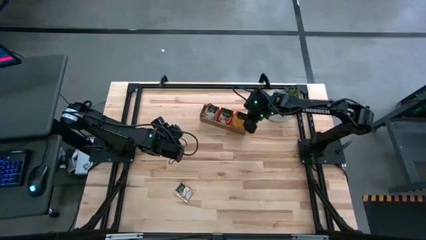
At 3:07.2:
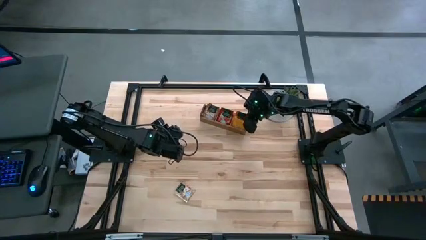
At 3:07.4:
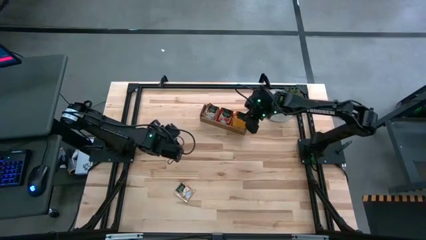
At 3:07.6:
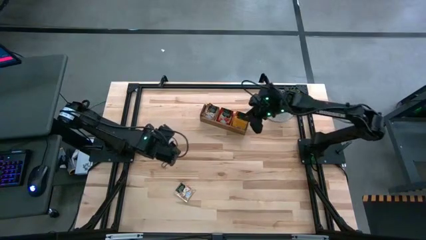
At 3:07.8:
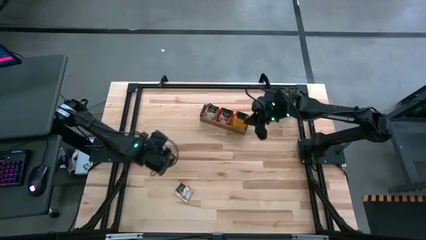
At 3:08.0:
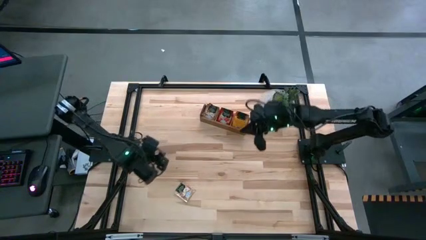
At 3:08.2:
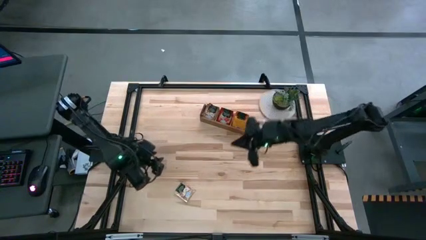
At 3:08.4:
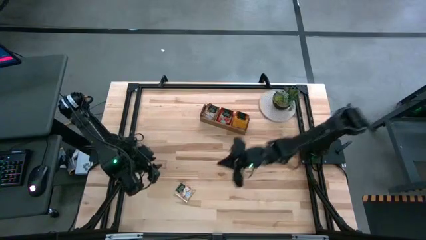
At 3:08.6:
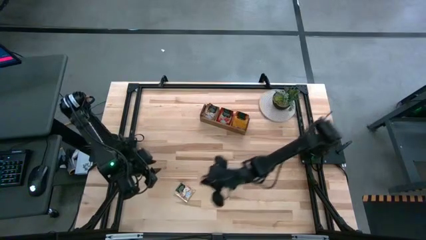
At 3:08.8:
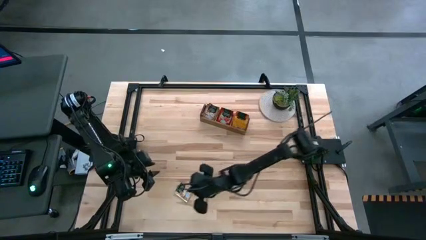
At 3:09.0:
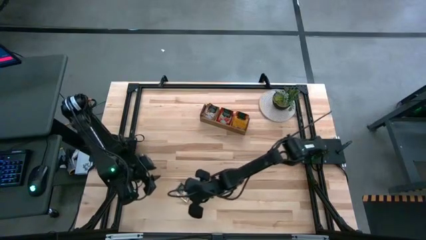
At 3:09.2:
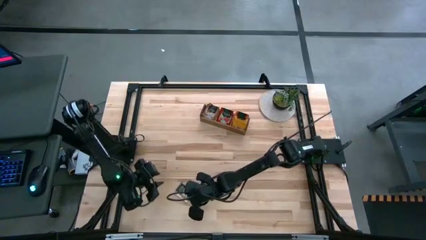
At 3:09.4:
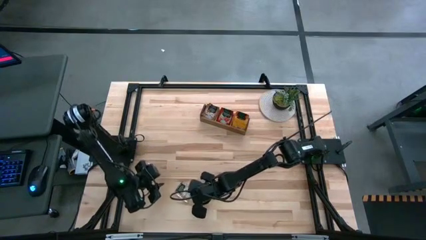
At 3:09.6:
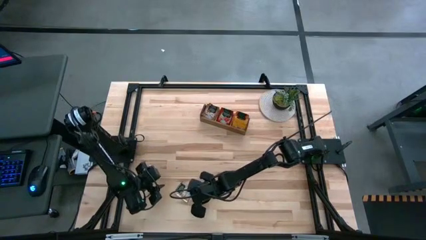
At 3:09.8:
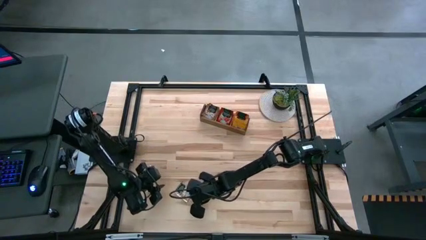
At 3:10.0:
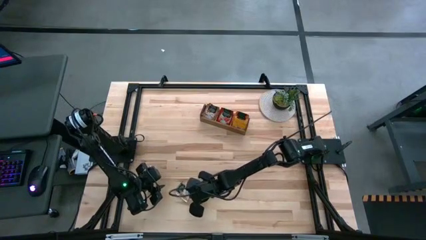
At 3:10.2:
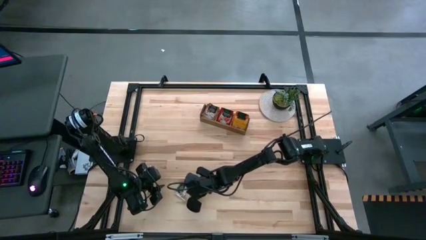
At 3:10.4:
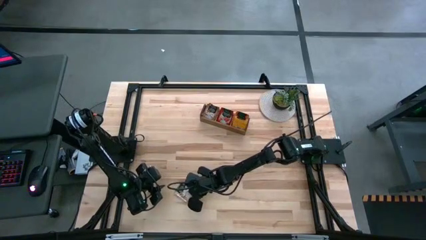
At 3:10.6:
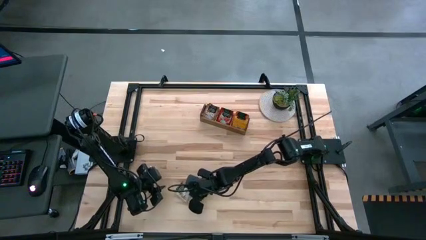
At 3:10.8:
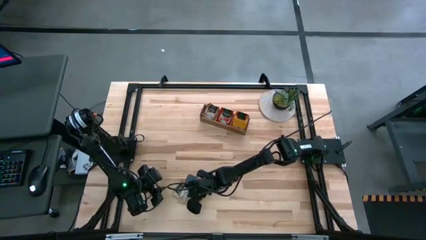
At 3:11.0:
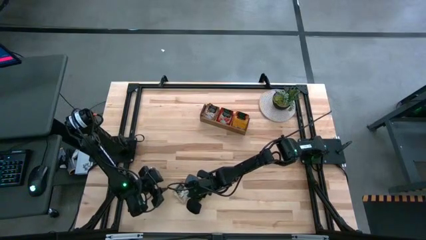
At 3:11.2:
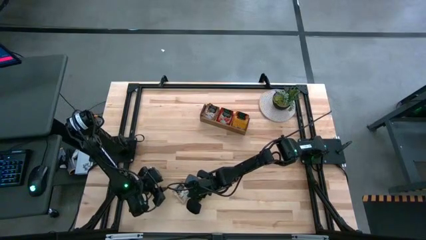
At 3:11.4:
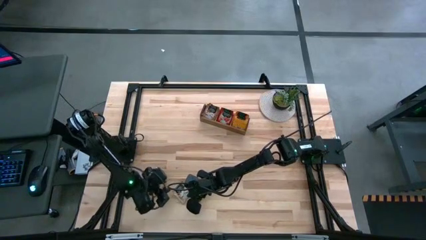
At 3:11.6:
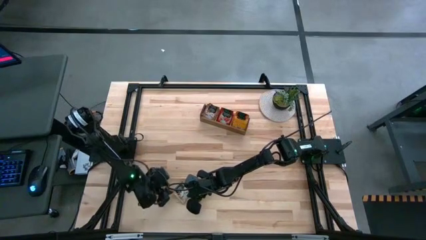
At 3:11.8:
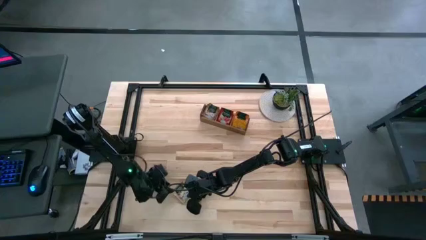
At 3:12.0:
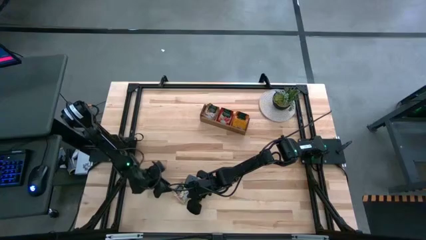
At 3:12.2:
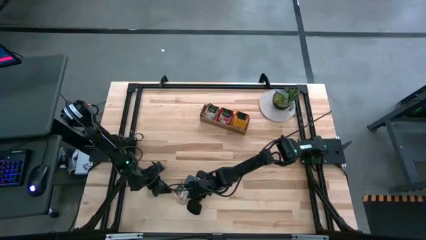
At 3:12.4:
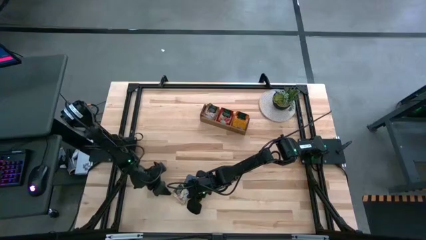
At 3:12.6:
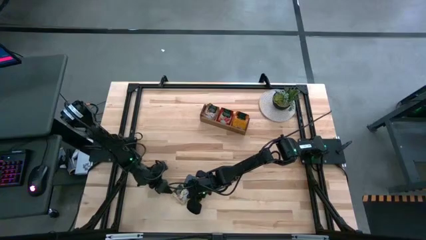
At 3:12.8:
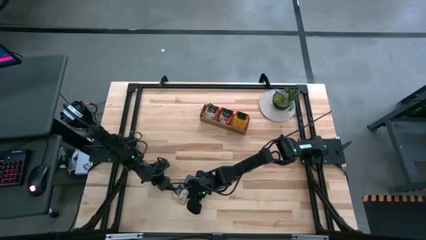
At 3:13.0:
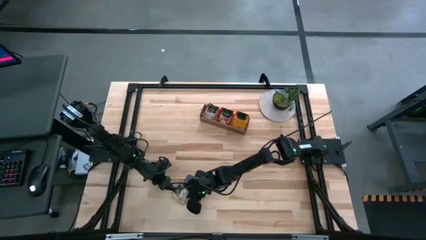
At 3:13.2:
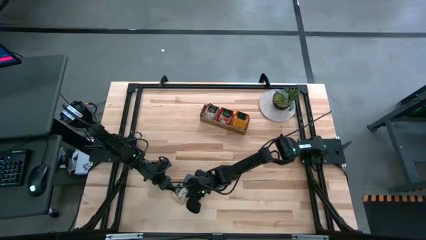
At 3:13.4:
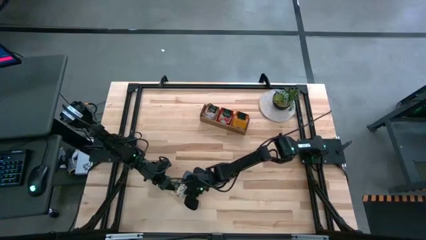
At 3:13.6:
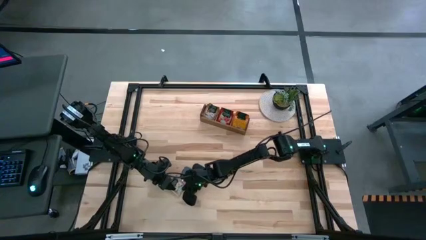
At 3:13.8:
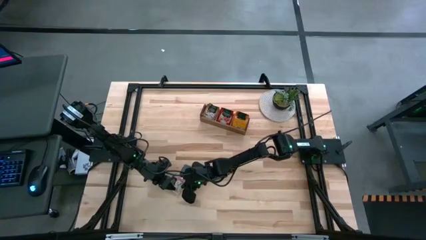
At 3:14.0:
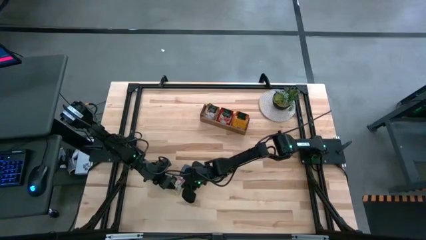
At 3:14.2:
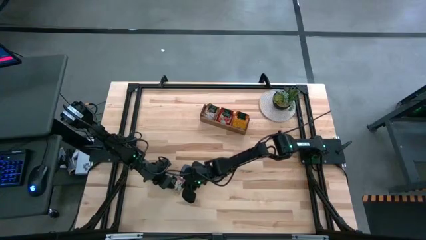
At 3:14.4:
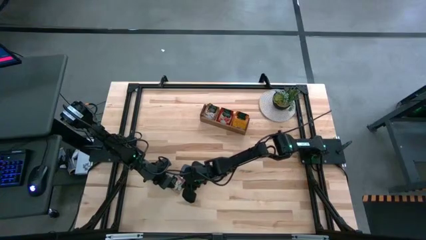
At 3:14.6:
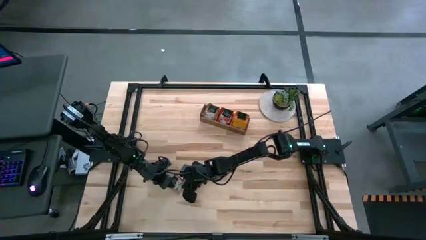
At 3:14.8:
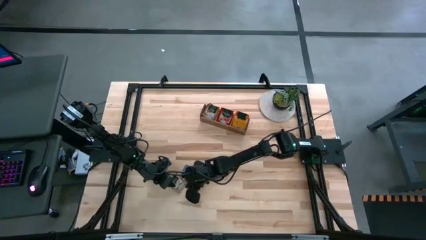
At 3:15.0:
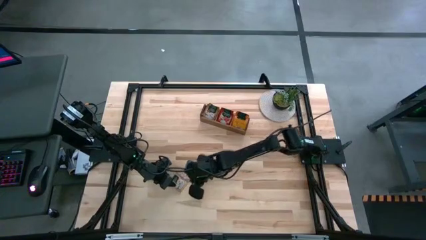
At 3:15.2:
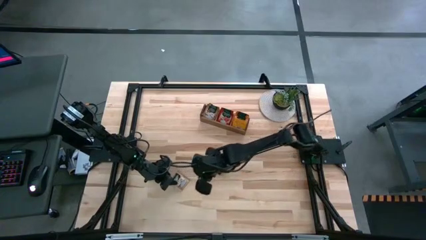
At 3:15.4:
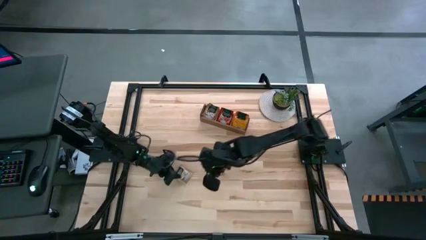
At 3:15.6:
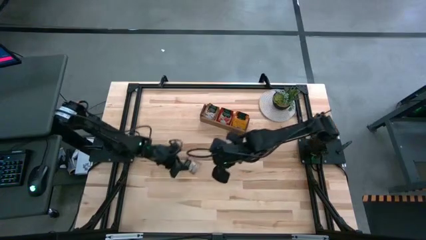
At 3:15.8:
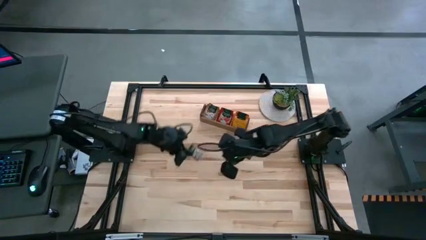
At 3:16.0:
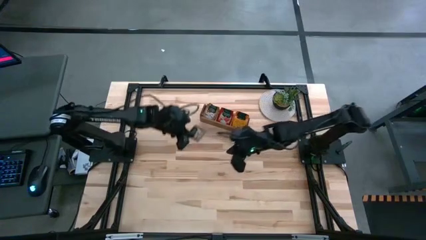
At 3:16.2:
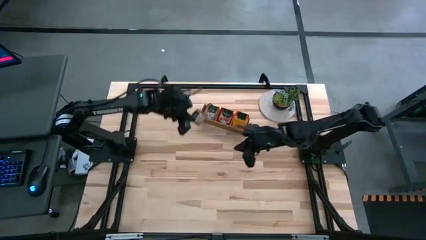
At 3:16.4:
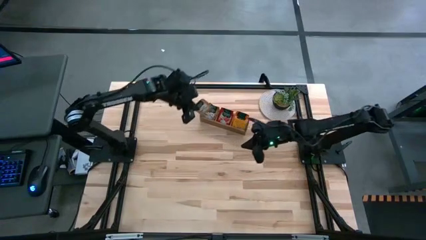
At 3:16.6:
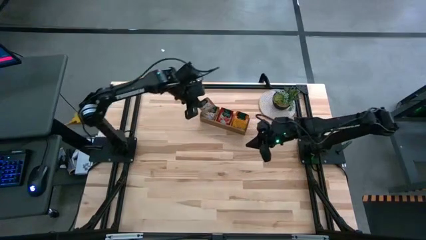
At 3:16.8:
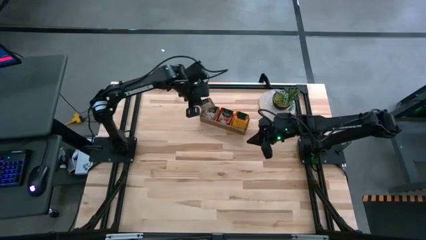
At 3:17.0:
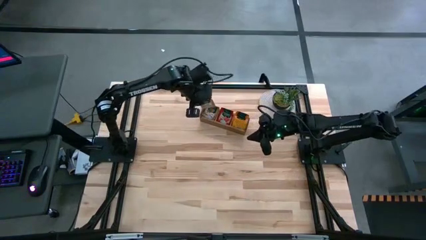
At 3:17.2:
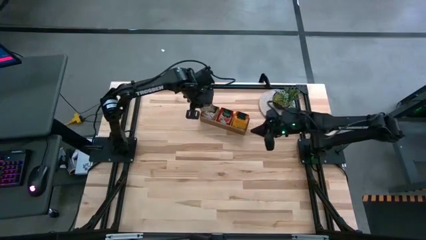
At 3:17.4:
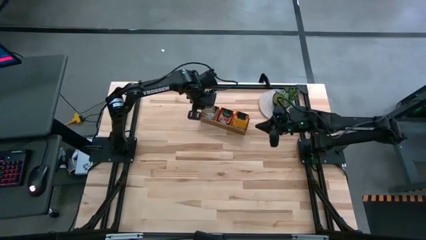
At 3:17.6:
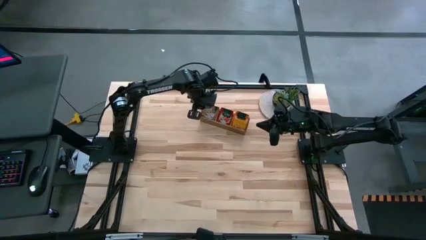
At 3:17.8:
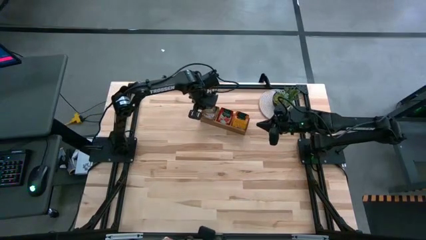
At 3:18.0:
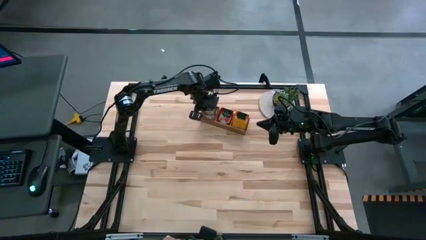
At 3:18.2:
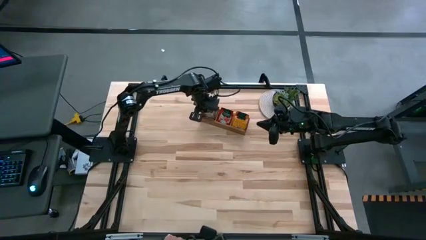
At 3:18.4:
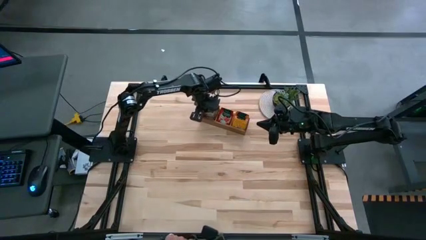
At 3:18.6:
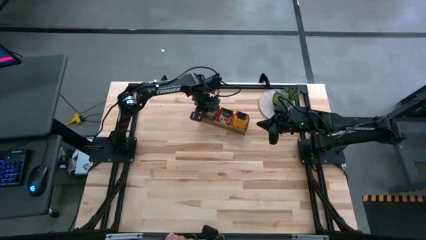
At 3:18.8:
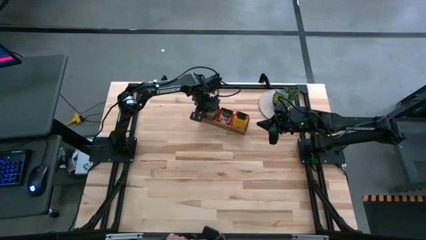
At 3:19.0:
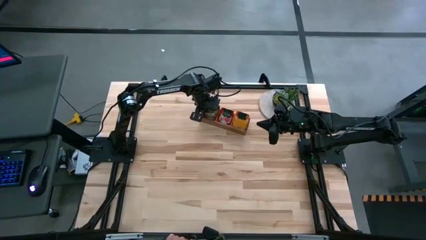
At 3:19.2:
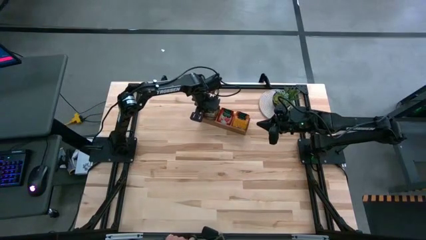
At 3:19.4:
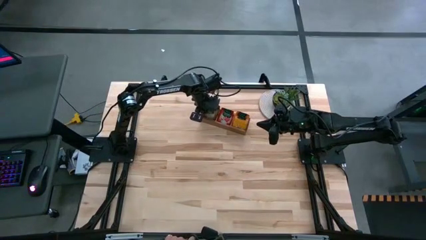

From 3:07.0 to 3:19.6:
Task: Pick & Place Tea
Put the brown tea bag into the left section of the wooden organizer

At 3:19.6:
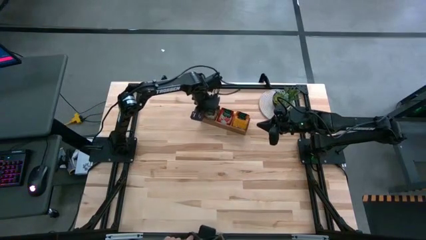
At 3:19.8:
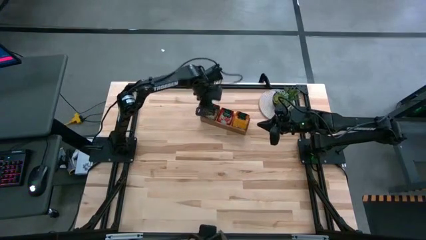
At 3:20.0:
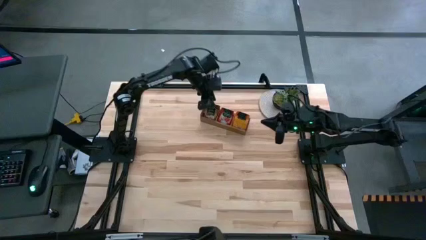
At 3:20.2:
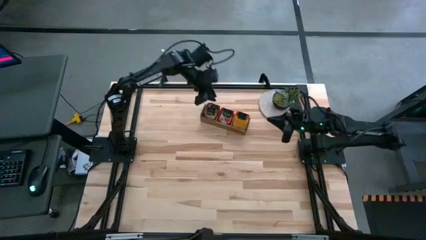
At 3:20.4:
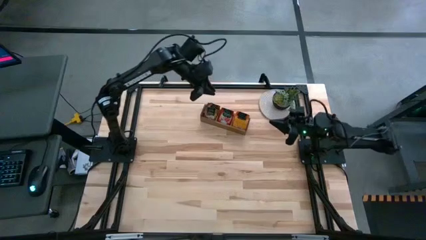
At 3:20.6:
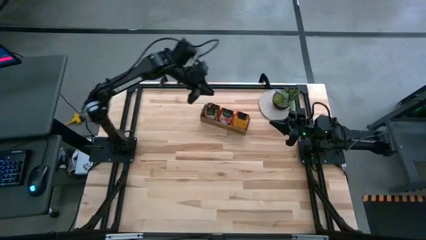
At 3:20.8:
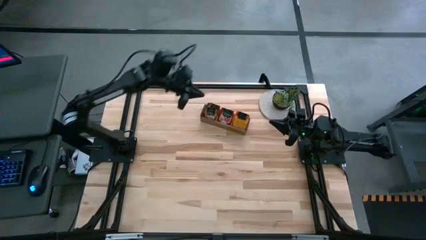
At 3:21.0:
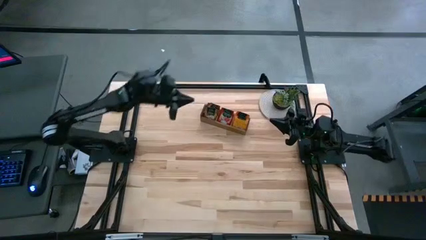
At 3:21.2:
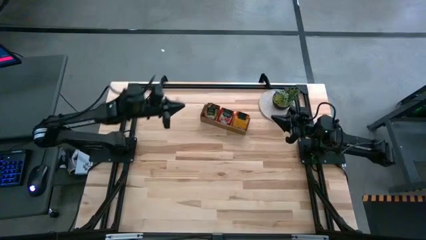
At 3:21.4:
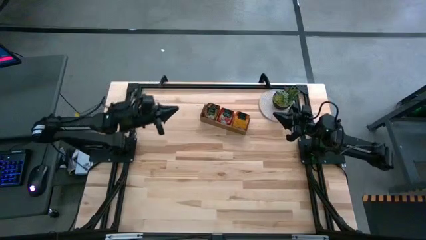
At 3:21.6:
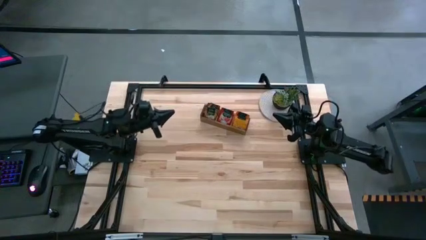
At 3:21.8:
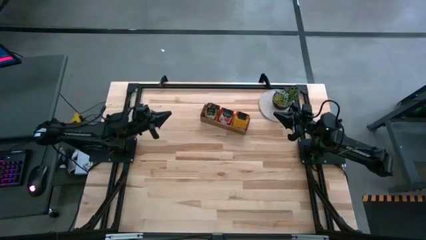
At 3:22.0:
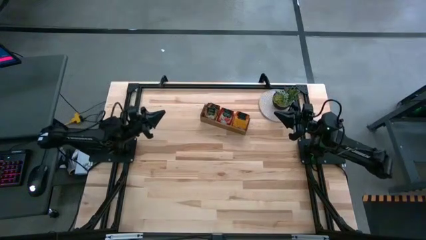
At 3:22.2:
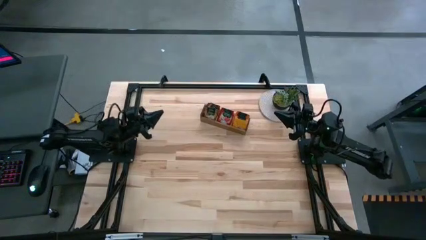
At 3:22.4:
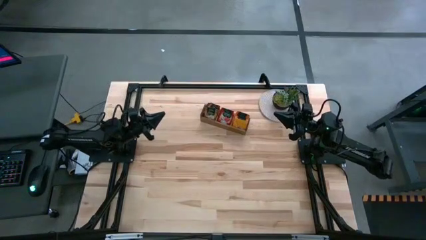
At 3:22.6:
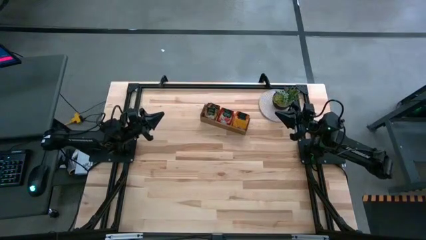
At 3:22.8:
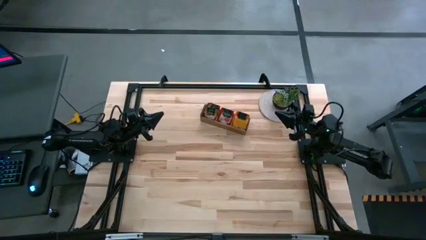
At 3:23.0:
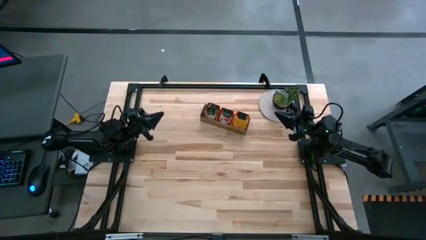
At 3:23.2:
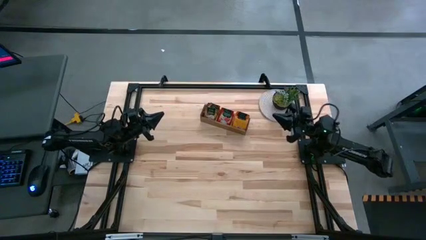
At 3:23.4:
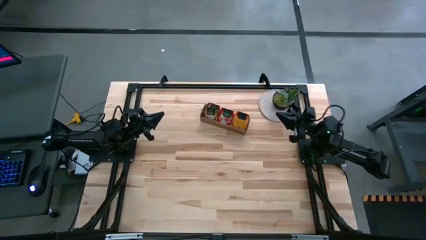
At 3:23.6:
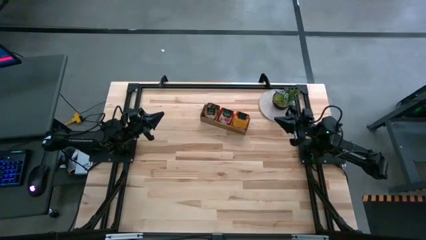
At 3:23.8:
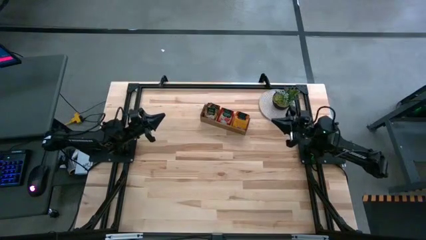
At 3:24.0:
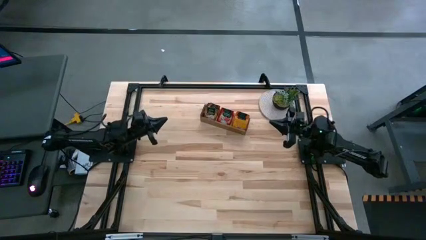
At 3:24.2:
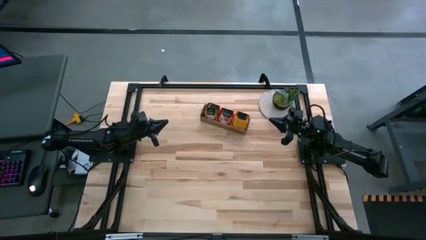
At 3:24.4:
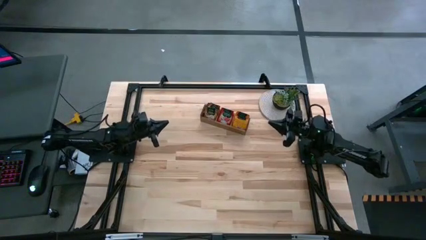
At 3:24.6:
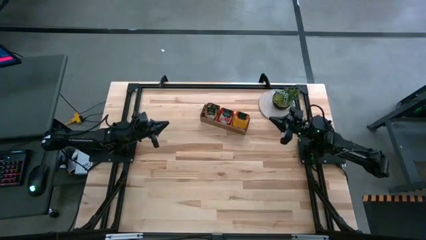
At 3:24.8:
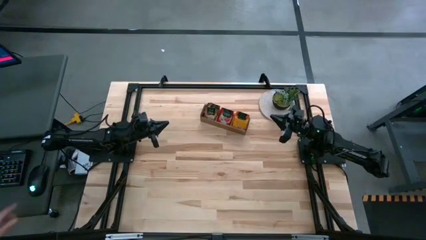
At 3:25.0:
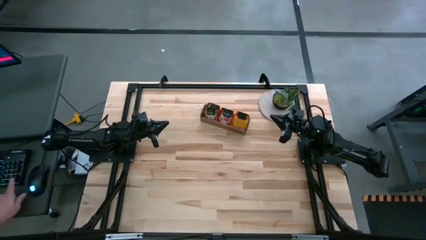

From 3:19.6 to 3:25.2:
Return to Home Position
